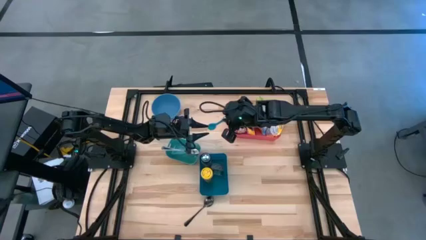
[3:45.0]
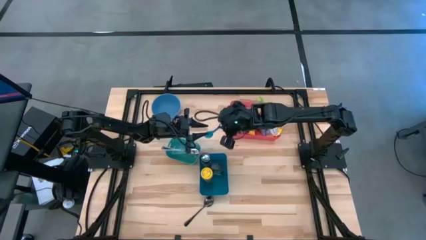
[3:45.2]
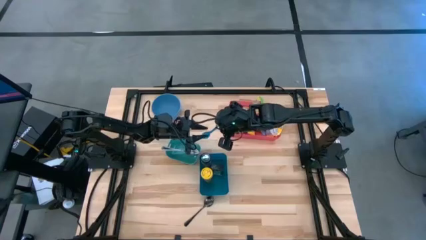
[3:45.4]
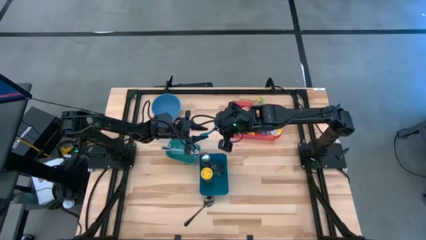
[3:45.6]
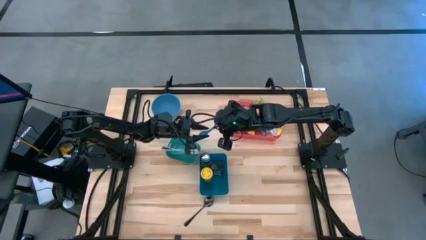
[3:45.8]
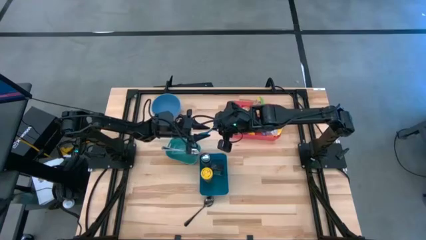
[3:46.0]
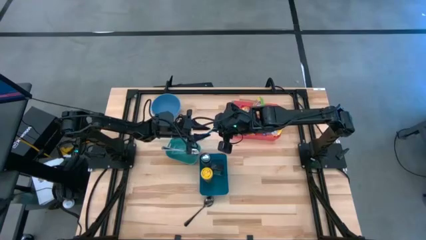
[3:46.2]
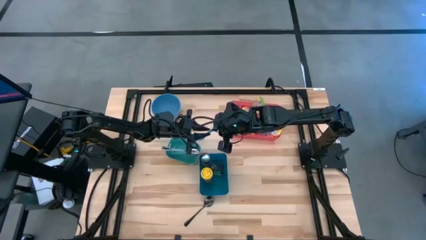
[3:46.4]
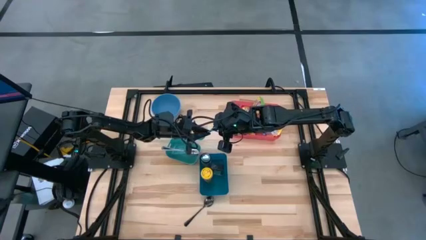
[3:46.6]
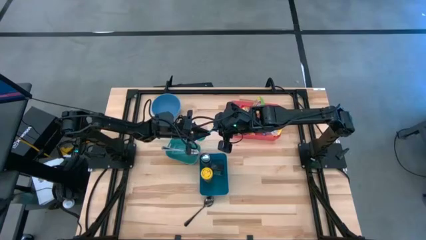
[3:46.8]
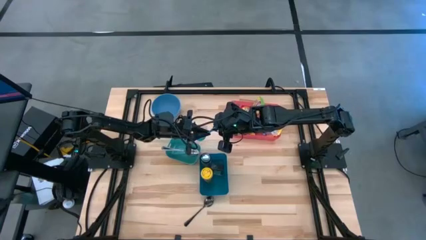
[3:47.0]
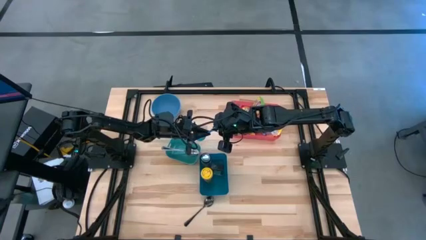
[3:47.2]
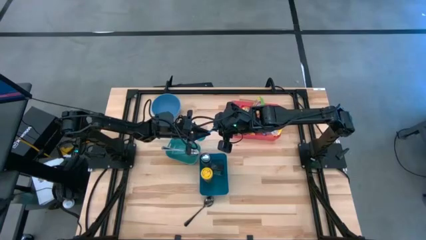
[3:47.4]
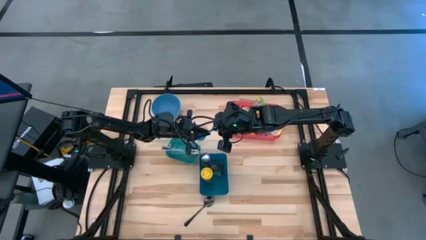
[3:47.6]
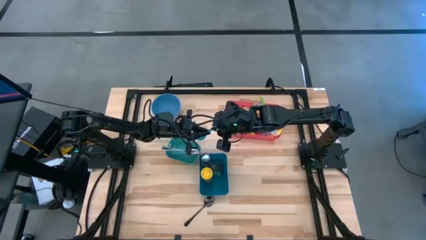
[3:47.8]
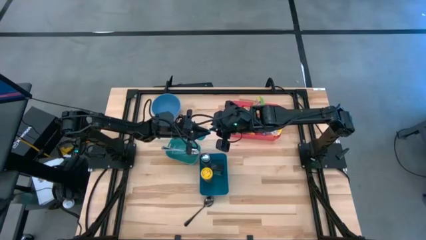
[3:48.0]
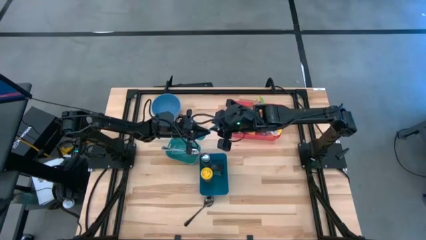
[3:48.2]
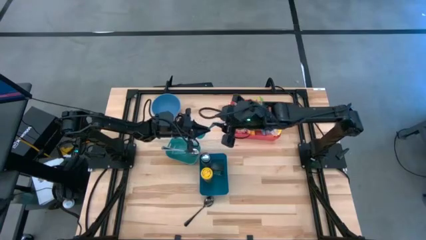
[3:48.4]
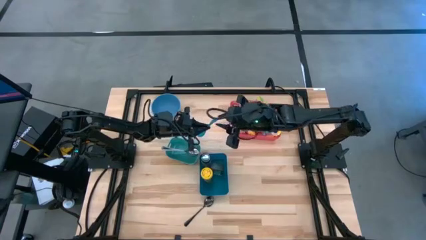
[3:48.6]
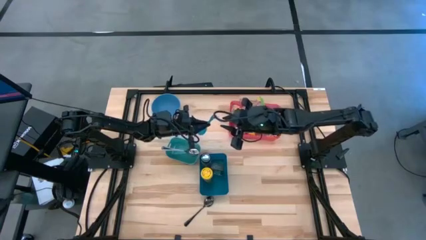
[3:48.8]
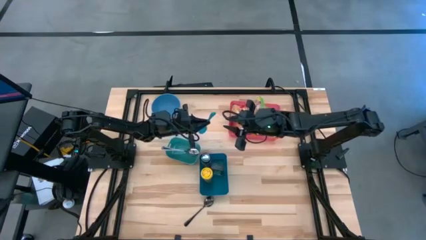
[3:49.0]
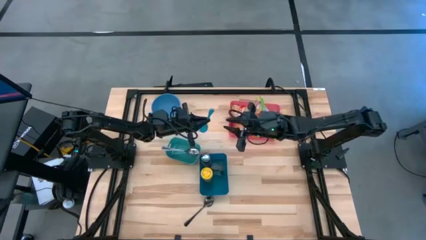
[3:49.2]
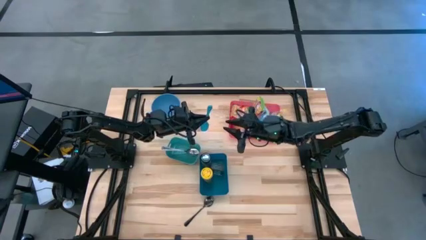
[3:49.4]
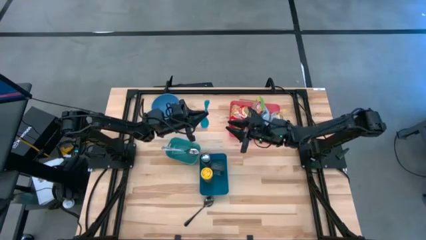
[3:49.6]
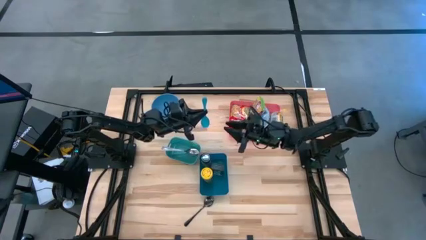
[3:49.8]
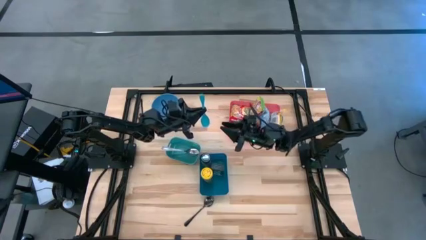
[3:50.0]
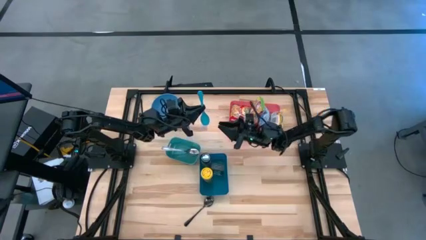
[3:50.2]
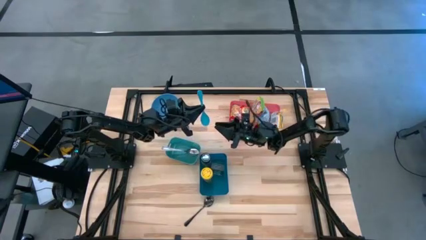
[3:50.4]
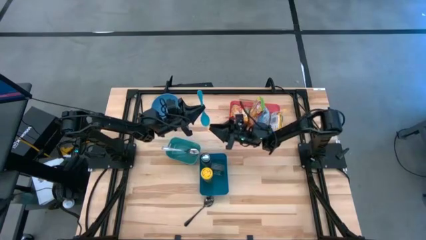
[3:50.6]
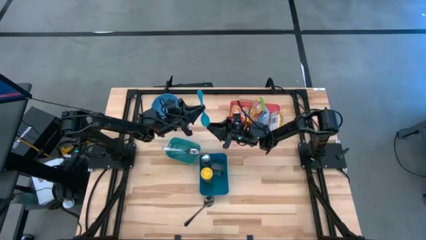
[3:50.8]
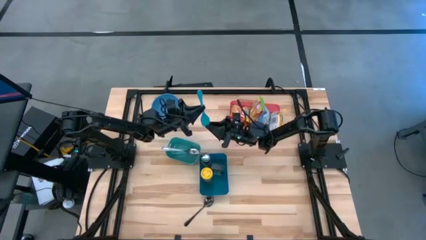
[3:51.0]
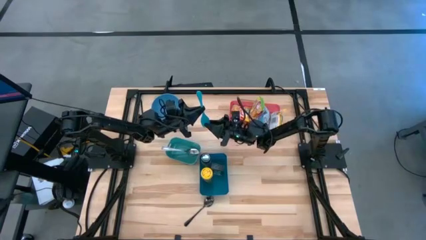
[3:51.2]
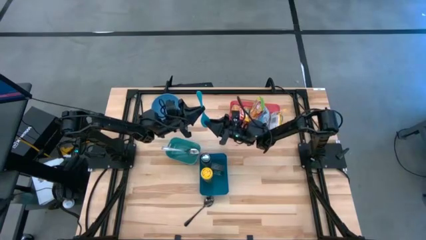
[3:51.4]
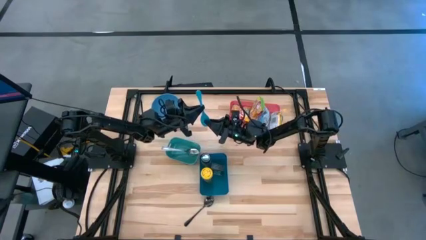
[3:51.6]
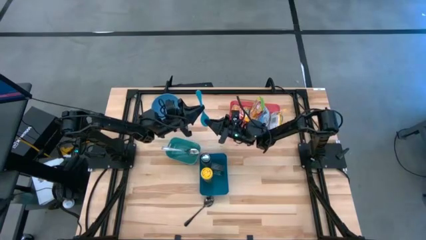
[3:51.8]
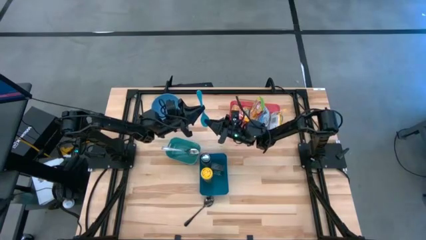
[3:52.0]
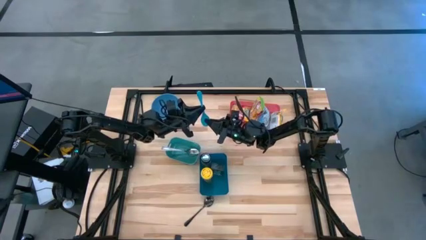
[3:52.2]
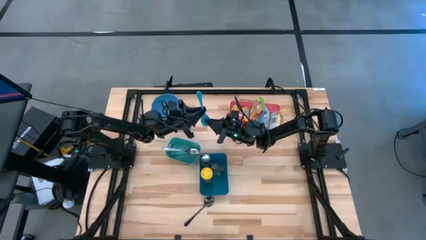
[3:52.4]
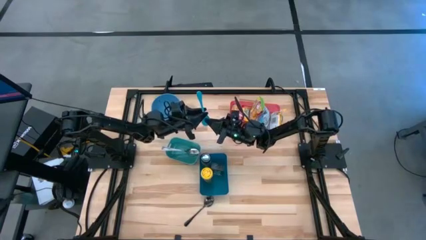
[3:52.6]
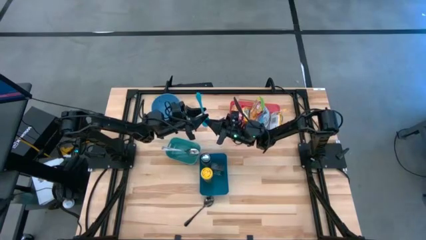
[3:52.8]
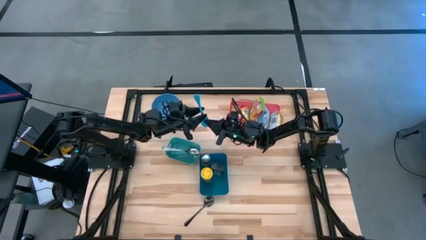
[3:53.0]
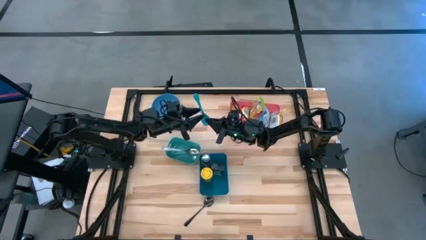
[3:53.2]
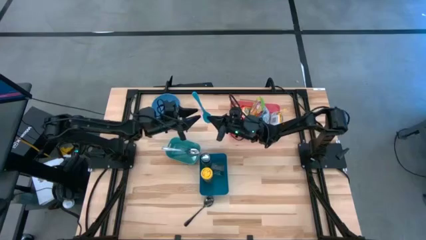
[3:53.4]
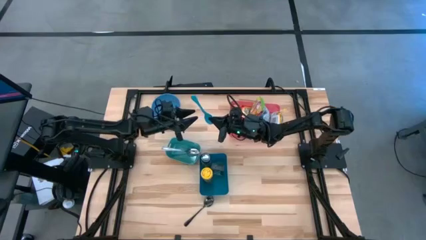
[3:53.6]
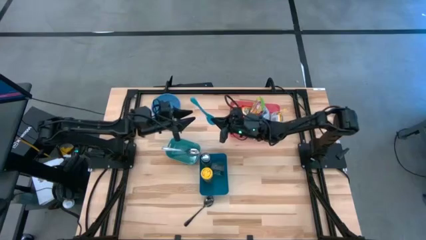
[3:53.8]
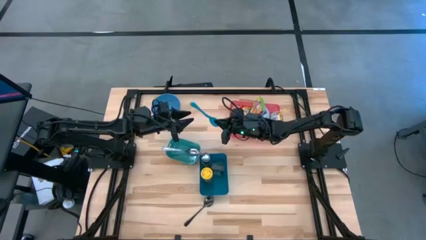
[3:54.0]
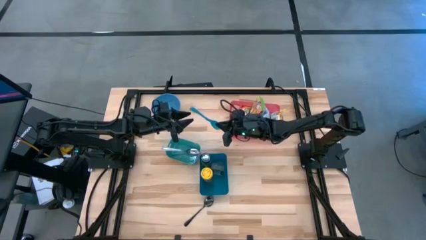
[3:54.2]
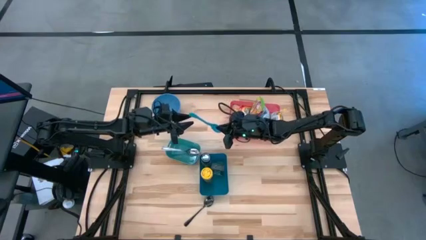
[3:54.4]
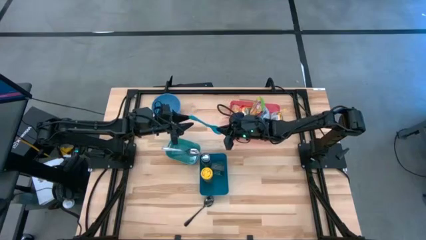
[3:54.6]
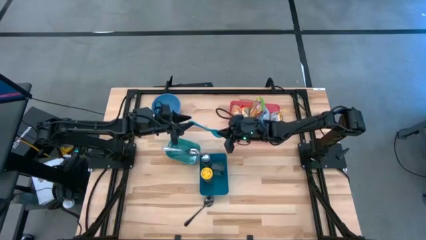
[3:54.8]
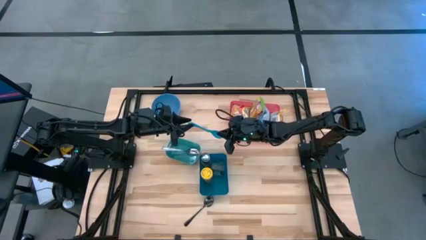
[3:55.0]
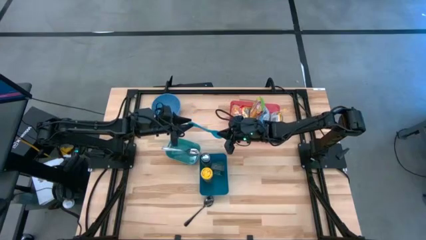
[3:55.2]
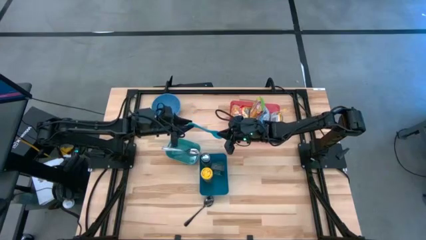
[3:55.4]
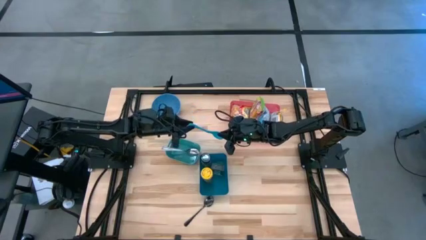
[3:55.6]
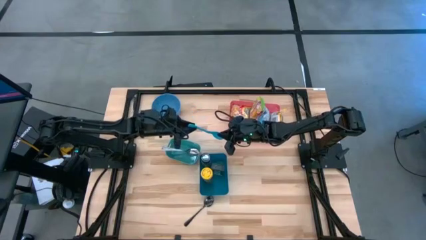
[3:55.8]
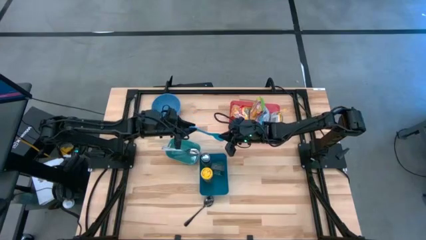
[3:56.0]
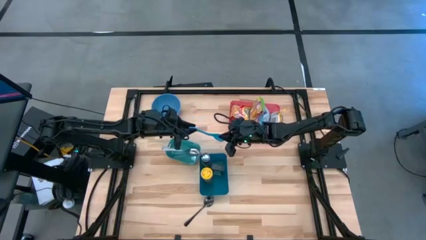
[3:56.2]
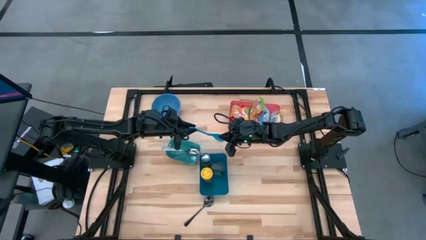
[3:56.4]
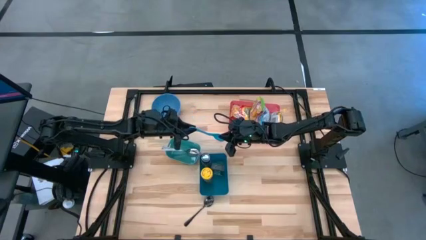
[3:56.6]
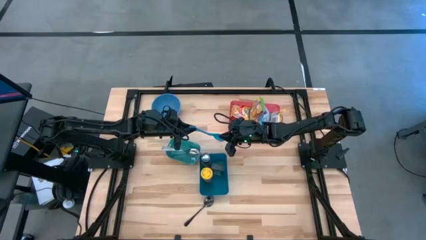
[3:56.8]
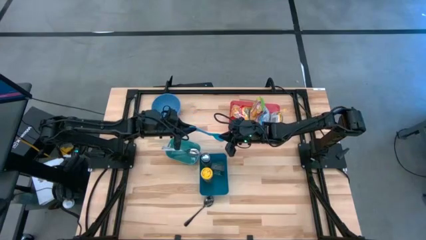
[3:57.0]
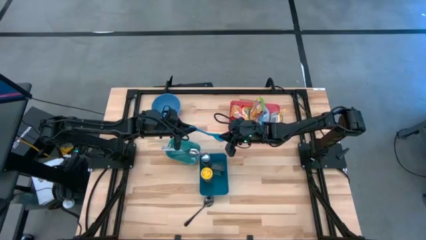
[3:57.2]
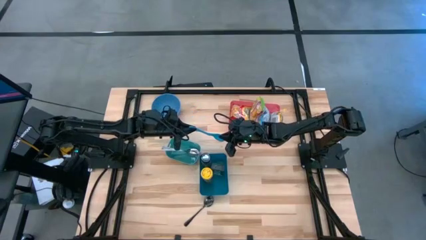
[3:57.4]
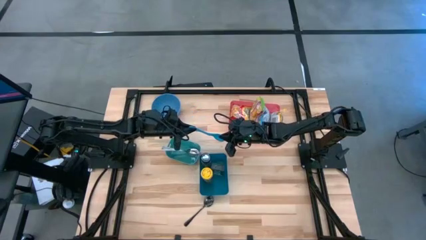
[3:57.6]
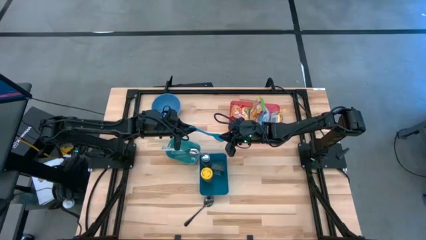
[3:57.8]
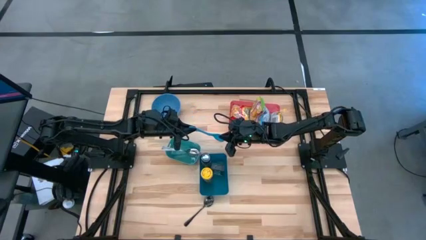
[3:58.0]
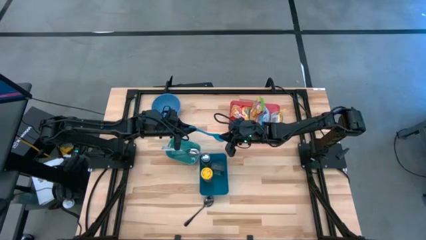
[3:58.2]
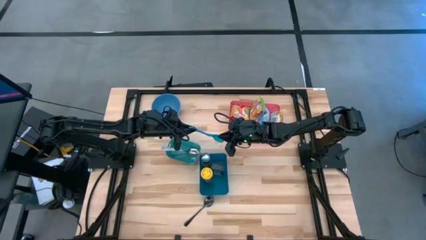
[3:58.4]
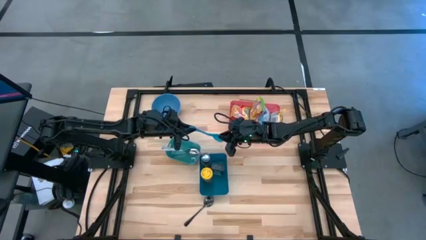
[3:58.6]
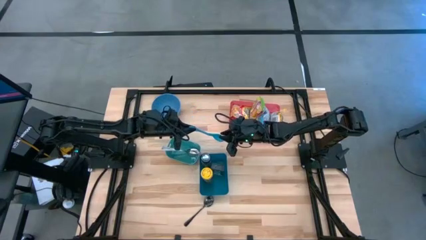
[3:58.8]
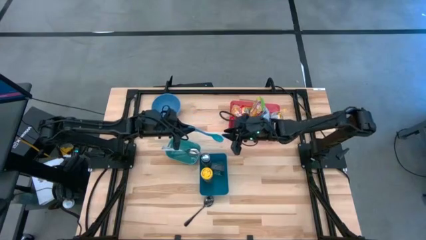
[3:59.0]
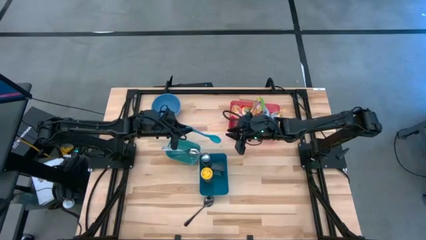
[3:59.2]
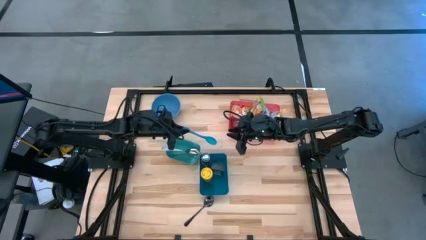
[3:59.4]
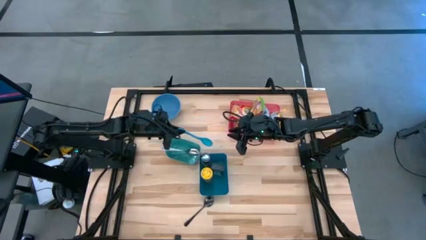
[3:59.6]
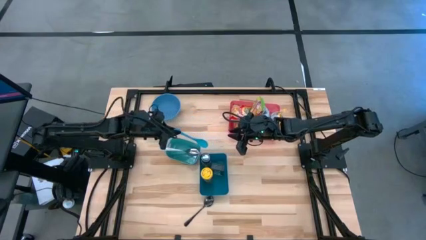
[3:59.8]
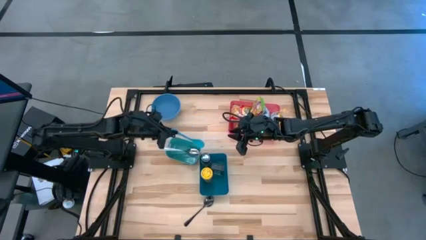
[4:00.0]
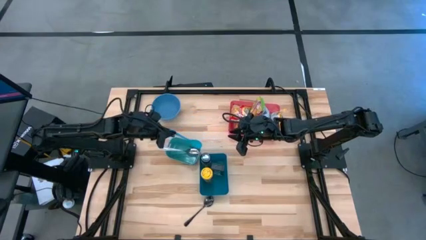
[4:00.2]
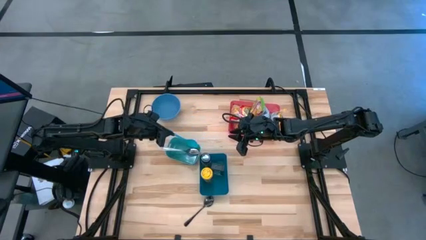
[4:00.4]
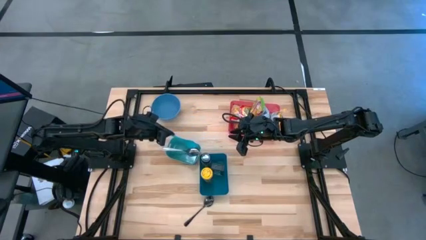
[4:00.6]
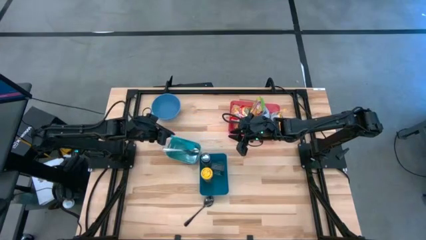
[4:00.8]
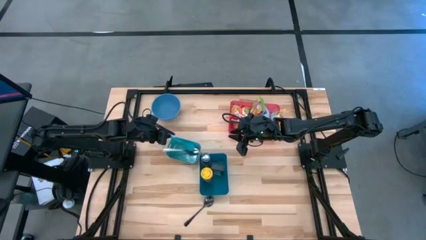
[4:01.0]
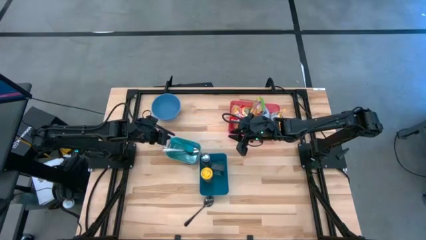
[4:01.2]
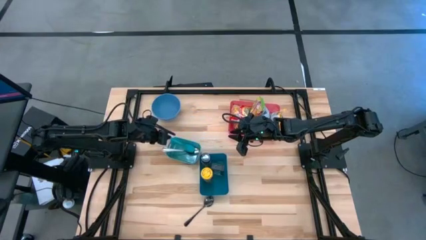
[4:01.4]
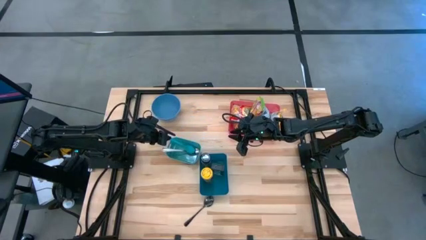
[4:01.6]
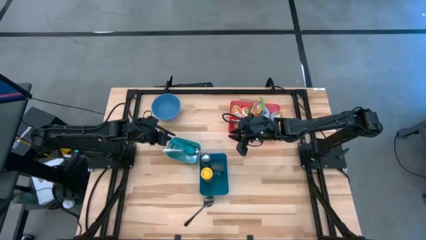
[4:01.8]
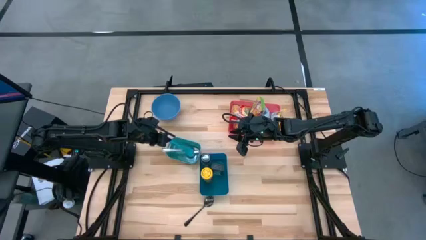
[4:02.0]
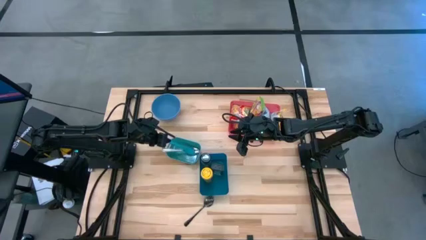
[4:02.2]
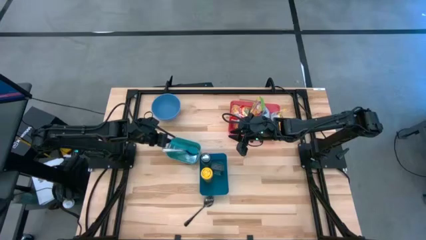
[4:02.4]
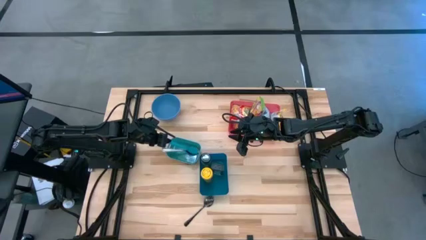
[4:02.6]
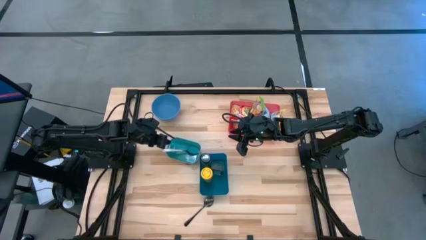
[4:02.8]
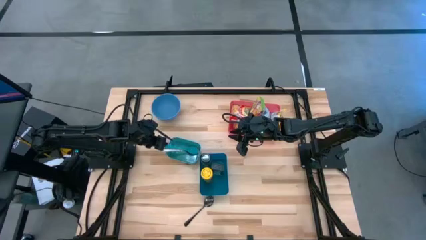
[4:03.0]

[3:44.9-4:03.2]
Task: Pick & Place Food Item
Put the blue baby spoon into the green bin
